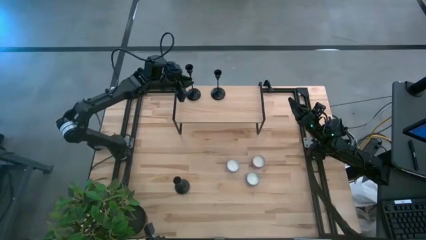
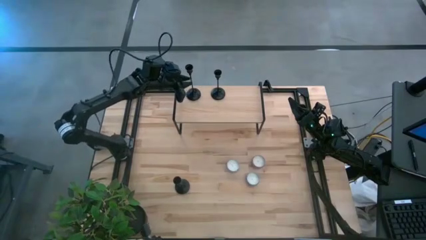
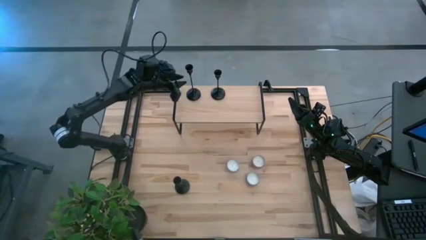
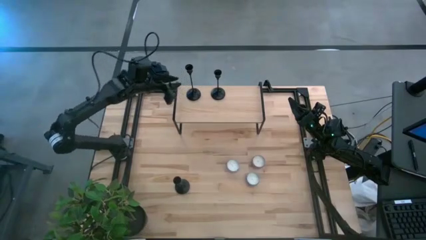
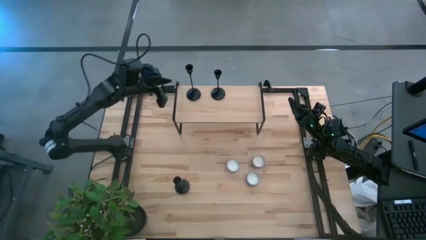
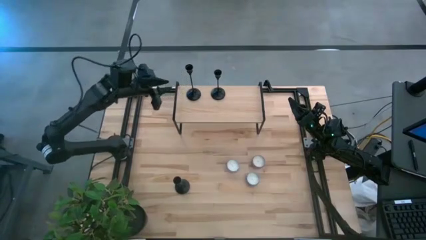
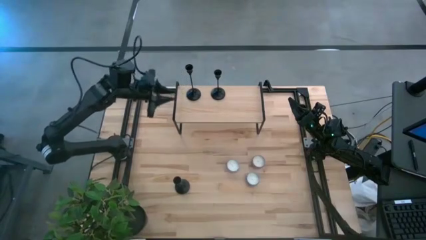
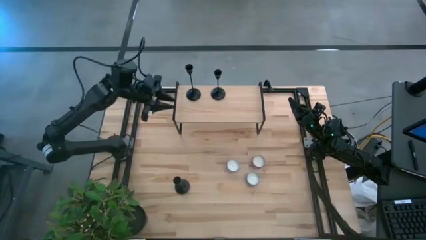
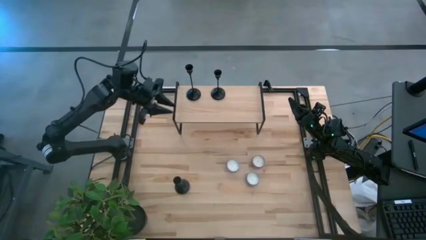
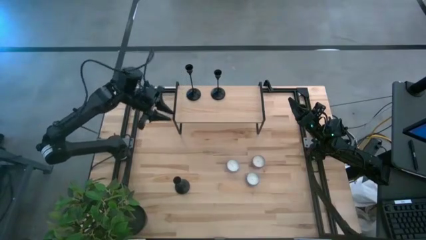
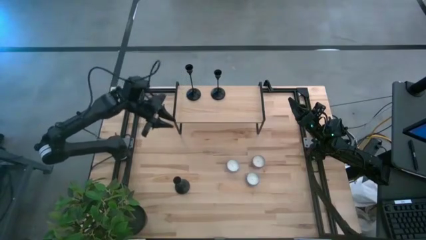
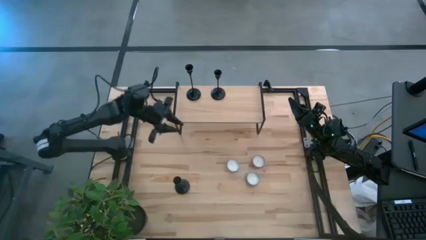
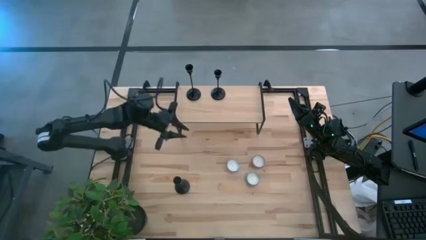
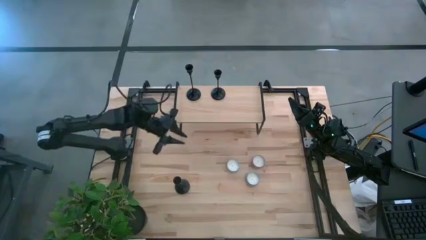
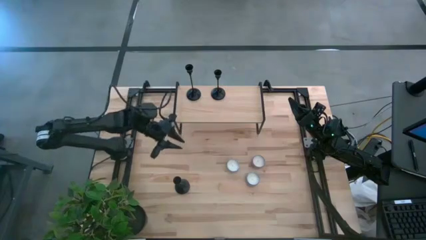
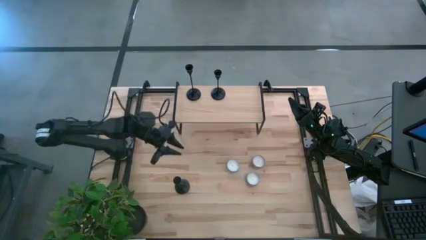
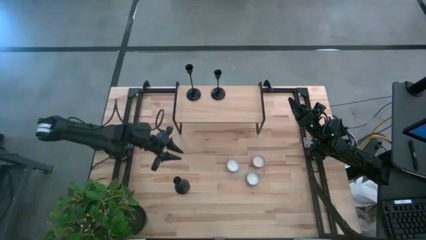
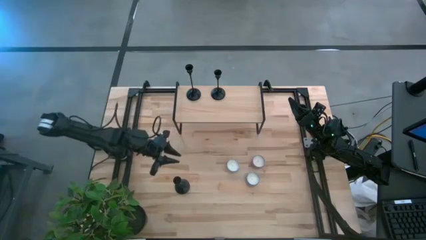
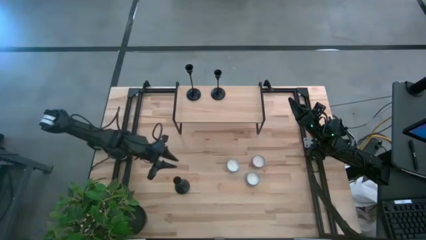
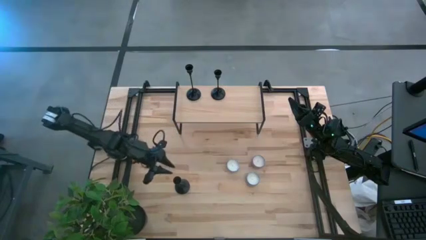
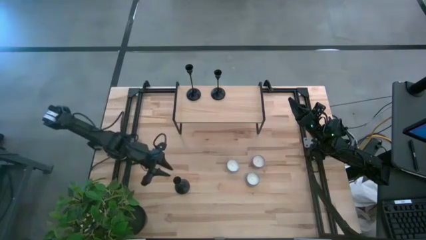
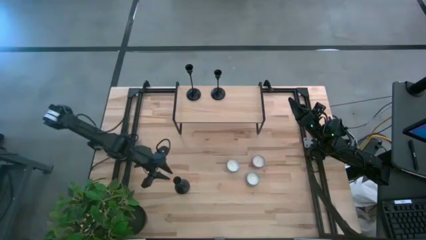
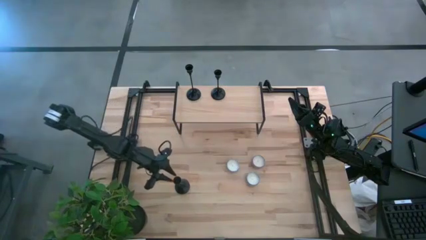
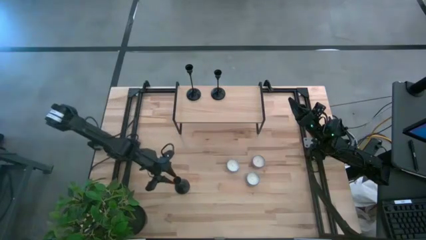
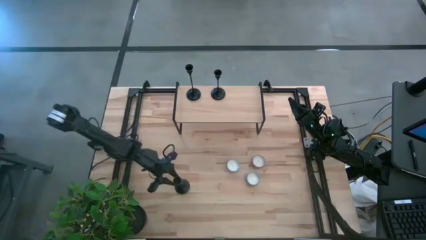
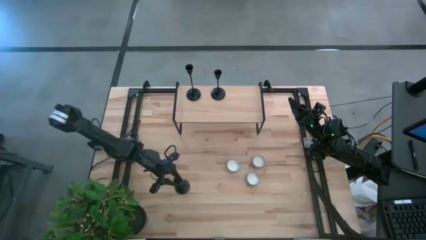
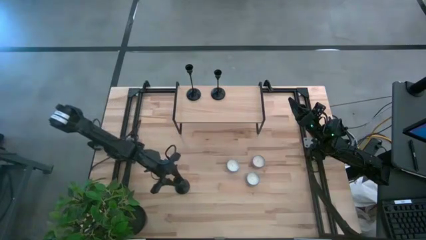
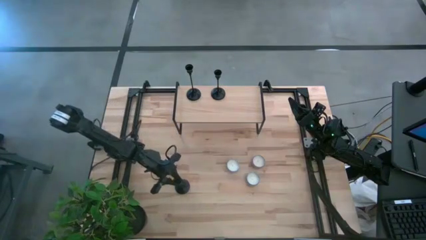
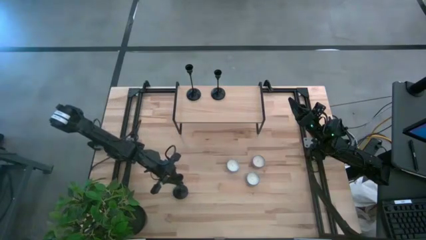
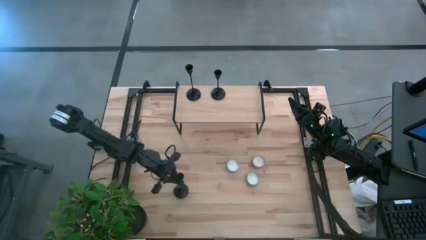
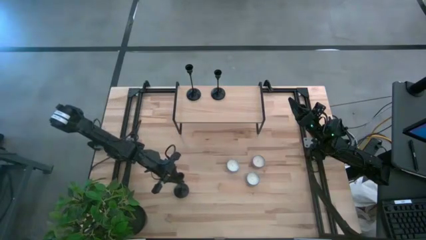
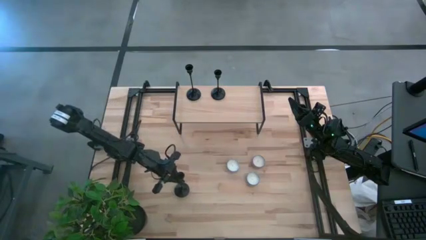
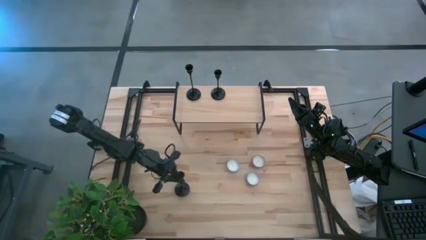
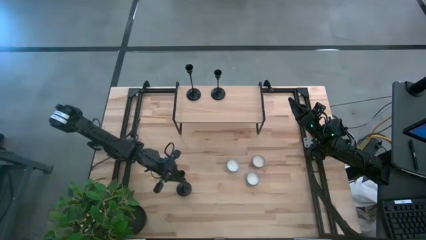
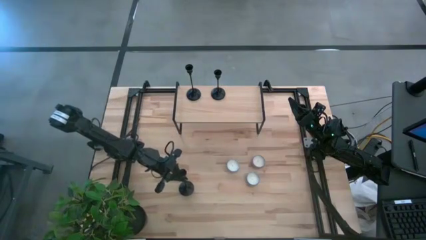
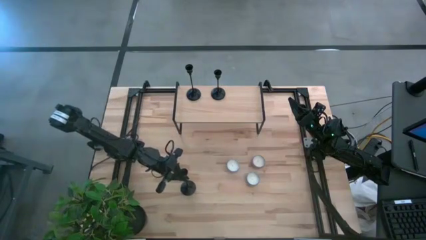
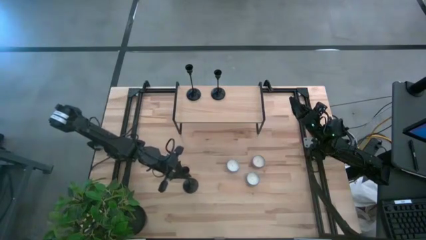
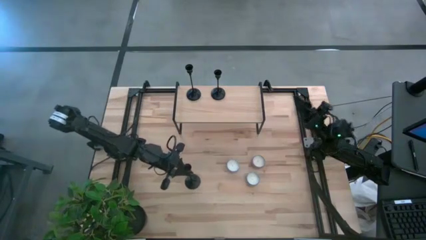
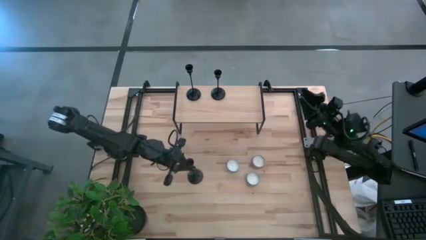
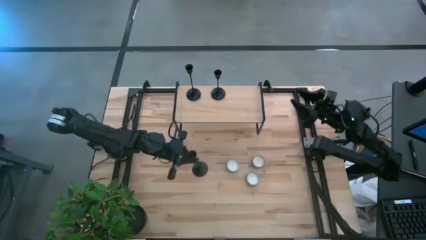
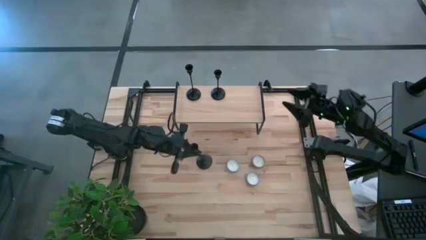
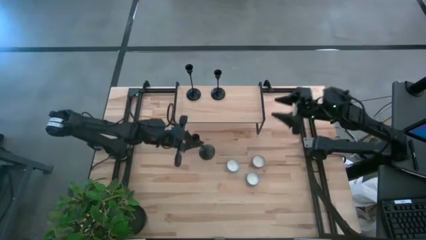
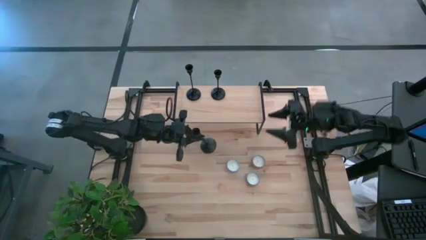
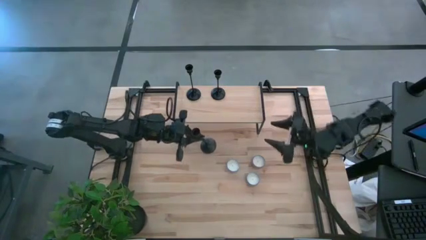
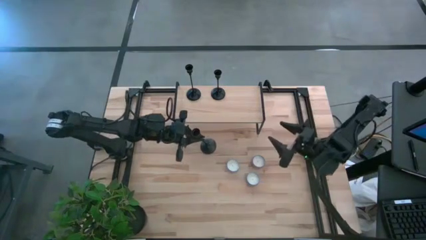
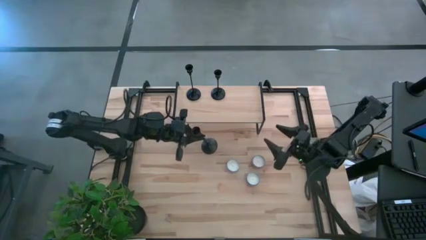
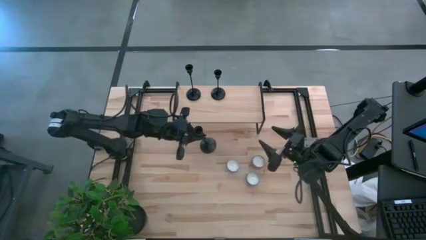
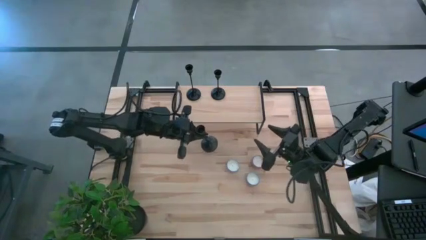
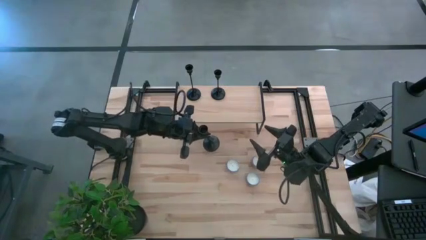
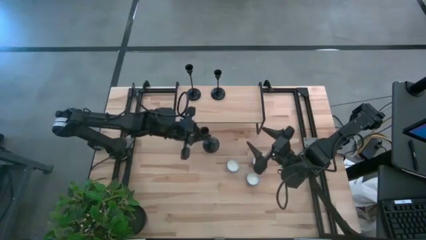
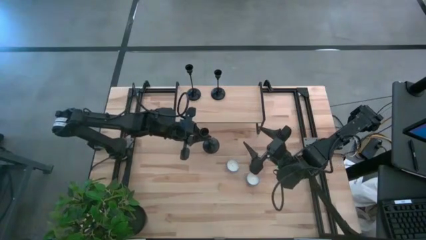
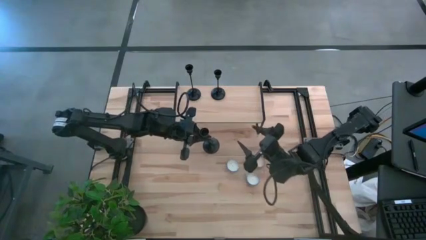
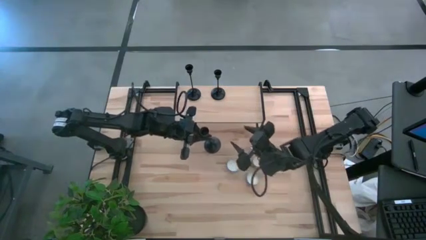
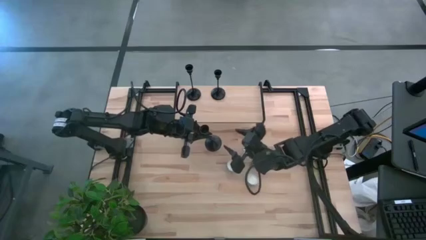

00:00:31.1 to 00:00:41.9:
Task: Pick & Place candle stick holders
Align the black candle holder with the other candle holder on the shelf
